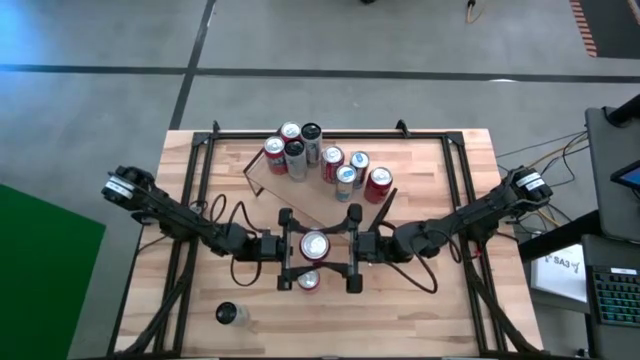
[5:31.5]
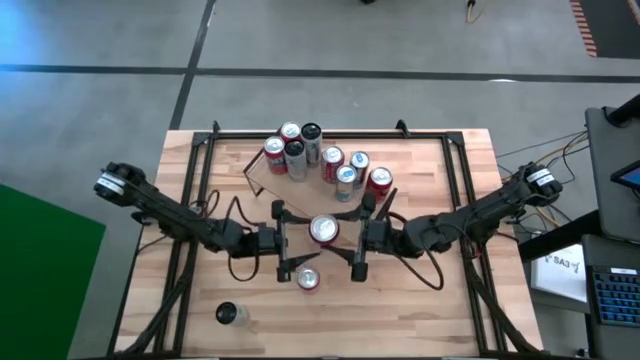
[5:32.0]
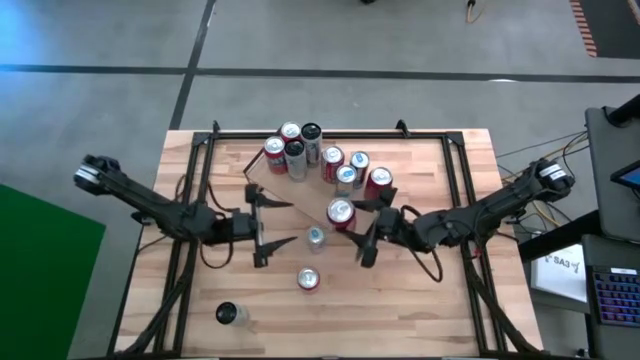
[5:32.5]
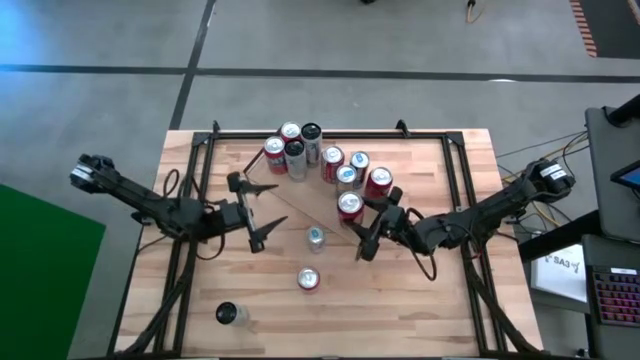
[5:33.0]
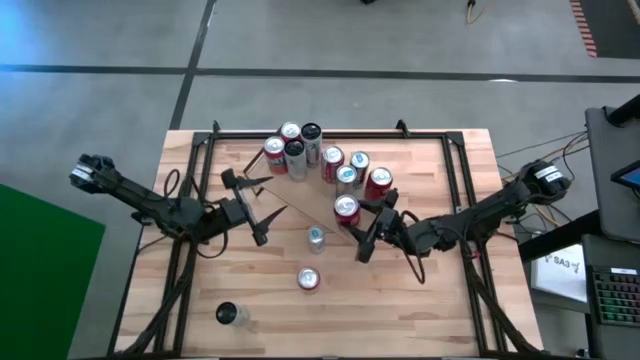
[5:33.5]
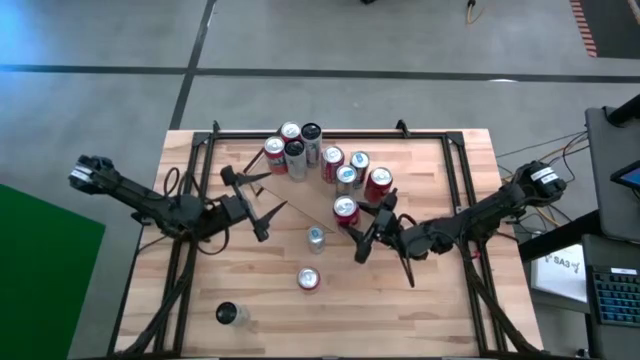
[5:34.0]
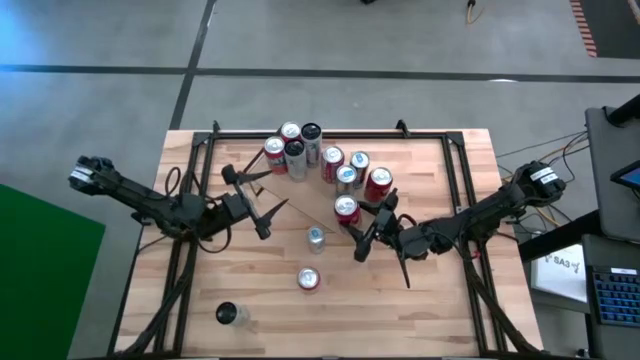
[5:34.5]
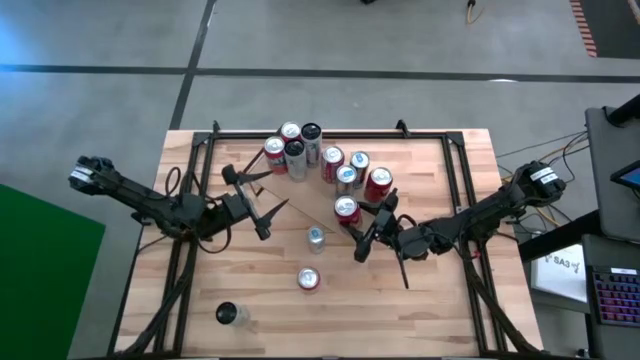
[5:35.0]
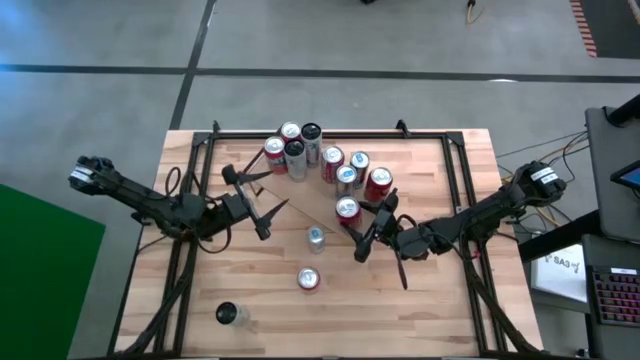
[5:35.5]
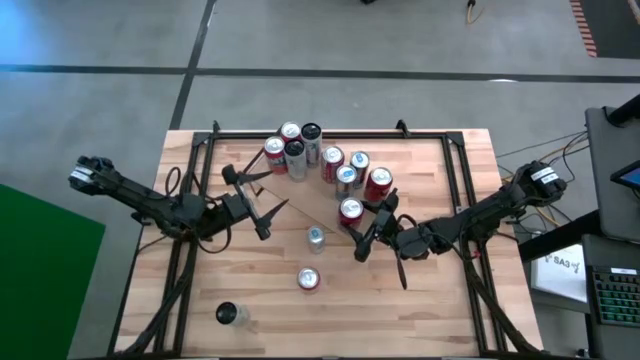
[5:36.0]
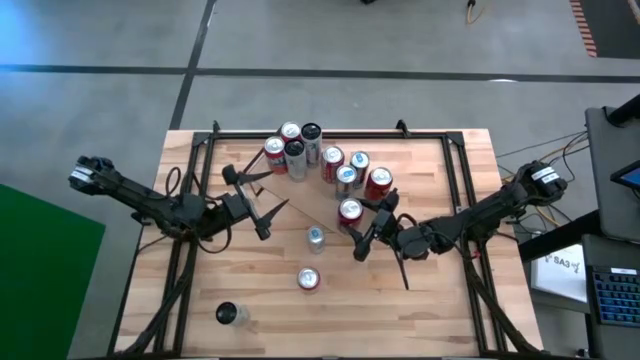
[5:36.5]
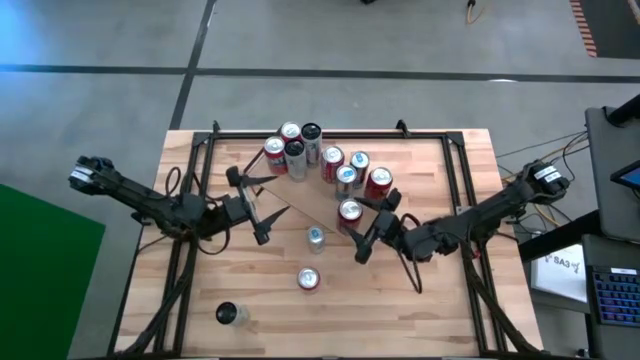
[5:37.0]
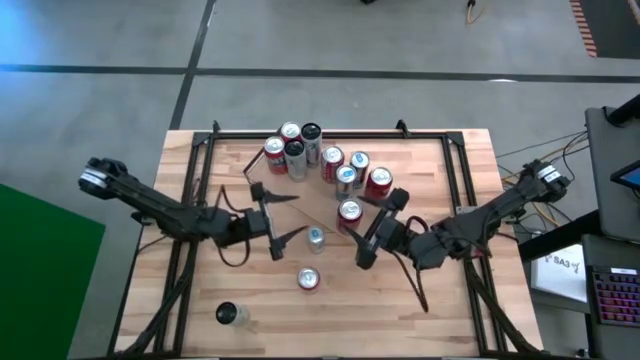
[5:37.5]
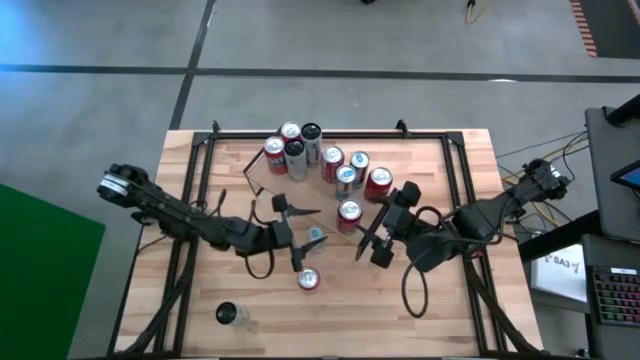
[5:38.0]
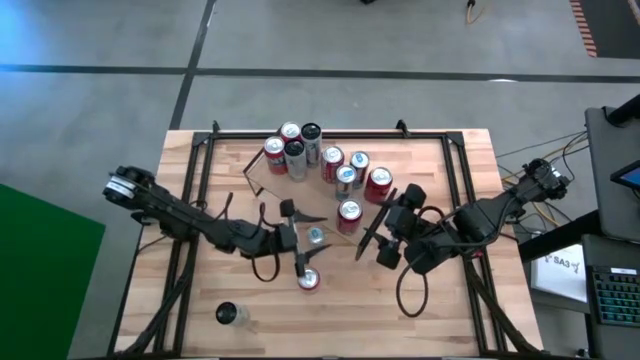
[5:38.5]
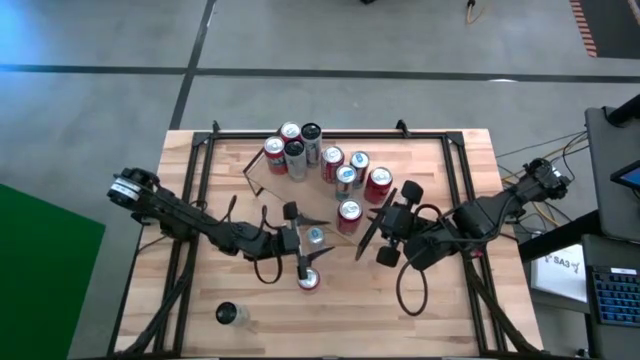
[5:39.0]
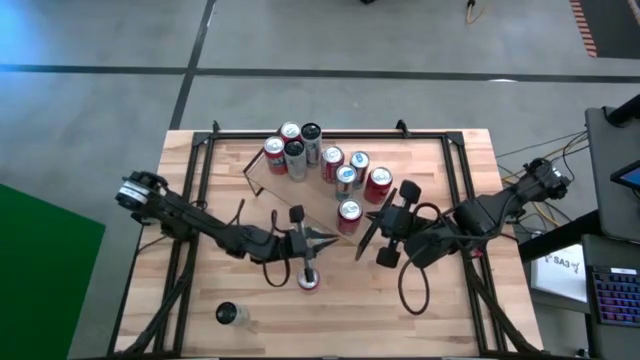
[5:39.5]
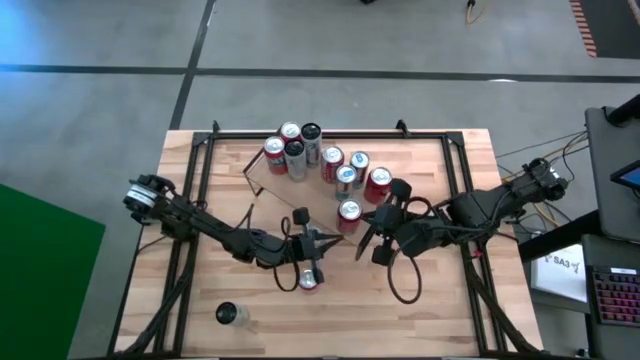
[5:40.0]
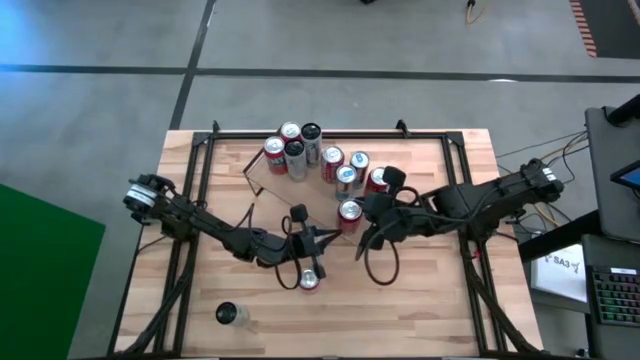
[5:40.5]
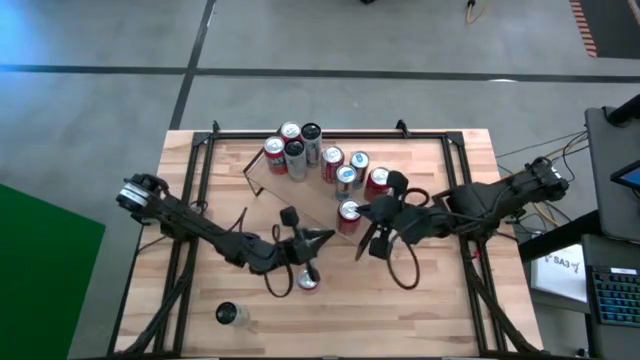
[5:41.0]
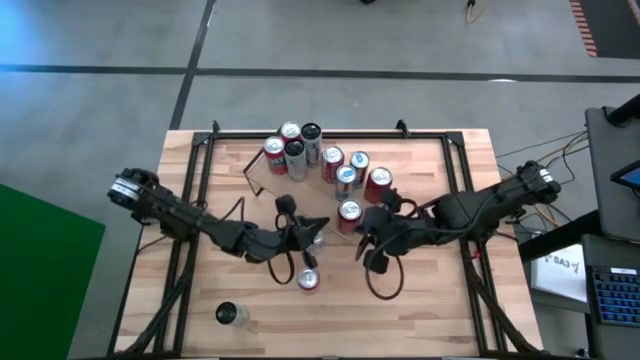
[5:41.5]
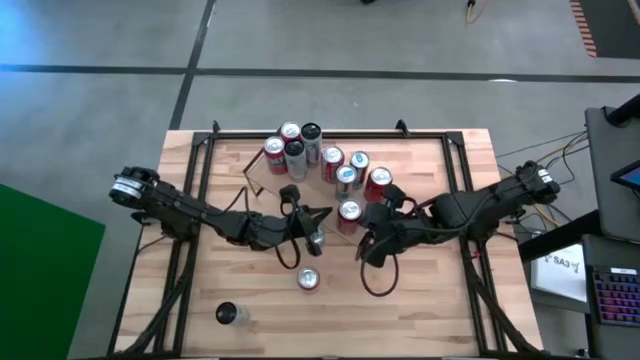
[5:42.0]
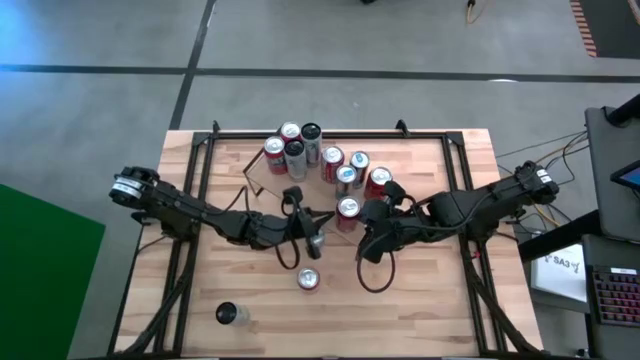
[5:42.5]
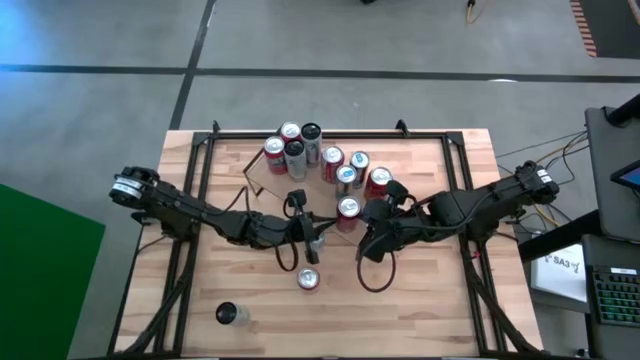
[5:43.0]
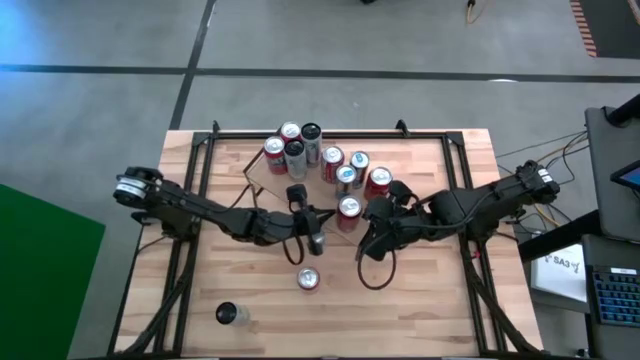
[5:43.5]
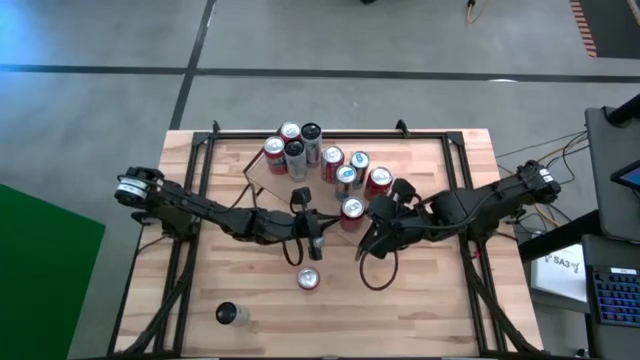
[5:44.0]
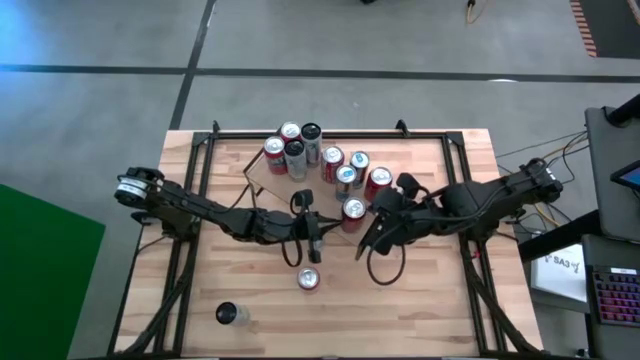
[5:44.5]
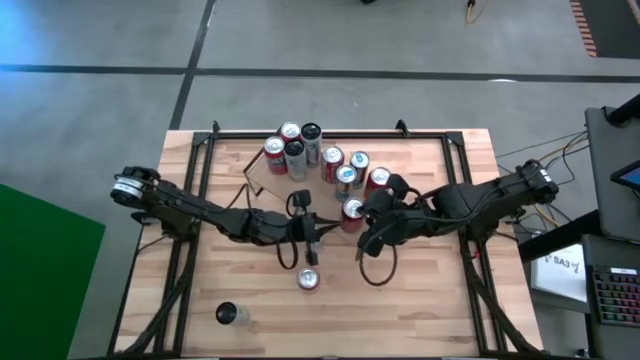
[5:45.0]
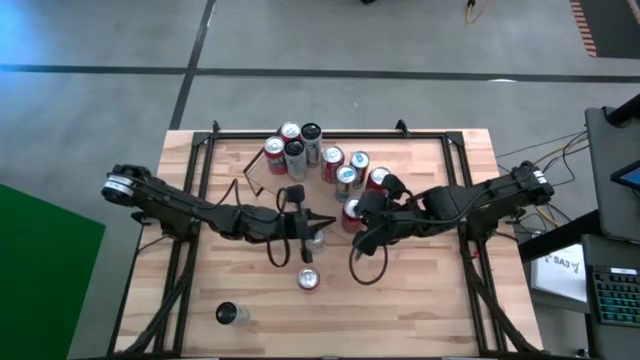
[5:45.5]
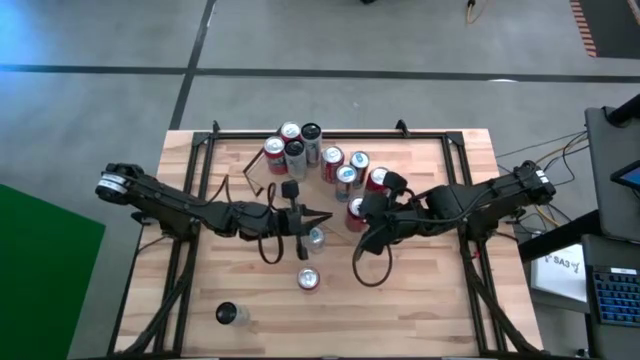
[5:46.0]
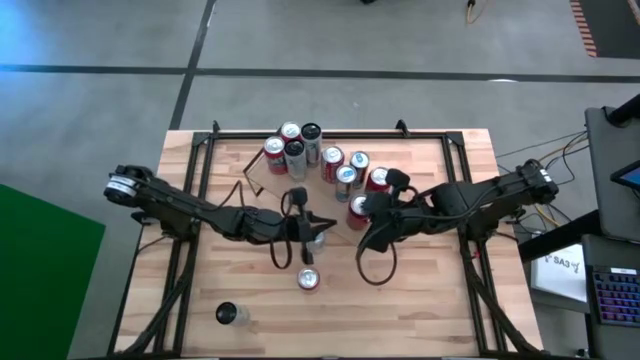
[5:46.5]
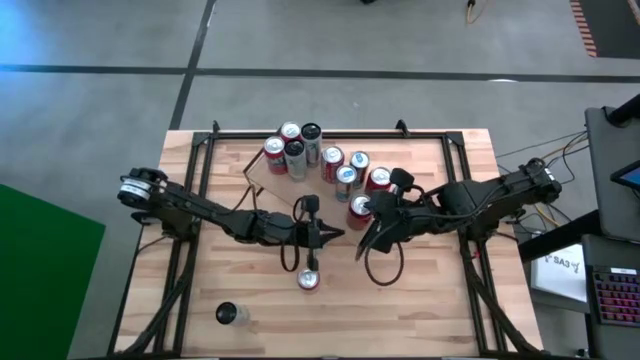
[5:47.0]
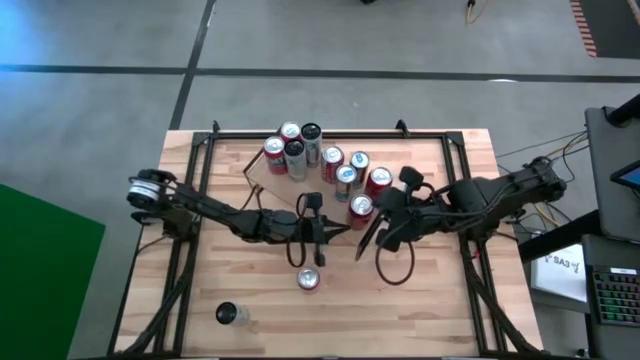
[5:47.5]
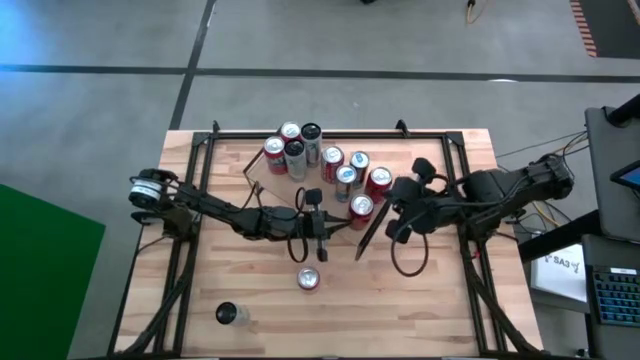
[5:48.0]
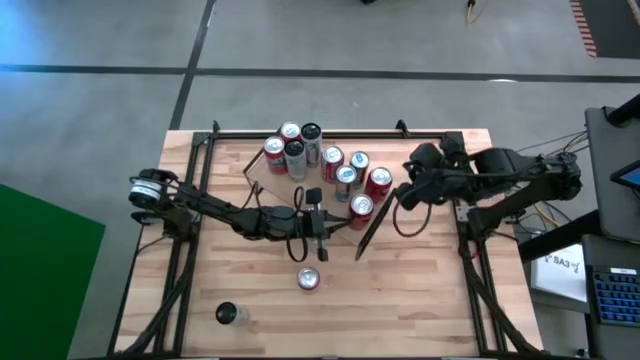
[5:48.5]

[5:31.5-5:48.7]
Task: Place canned beverage on shelf
Put the red/black soda can on the shelf, align with the other red/black soda can

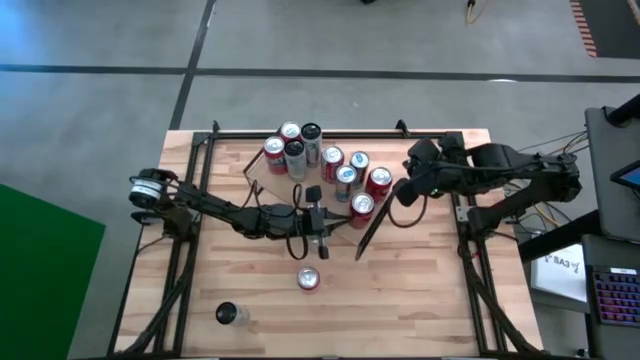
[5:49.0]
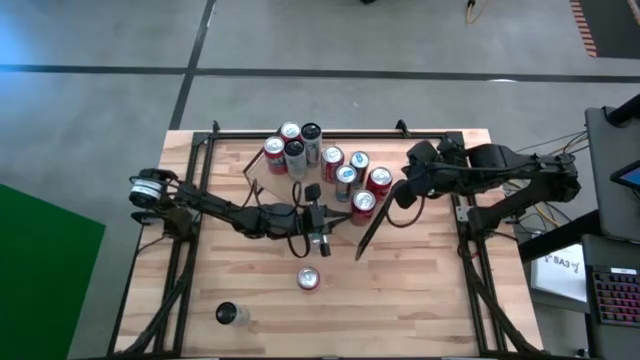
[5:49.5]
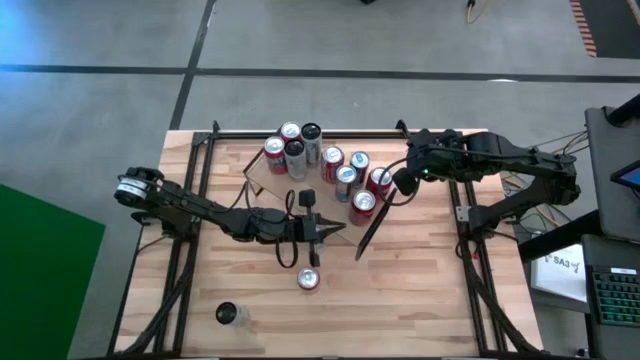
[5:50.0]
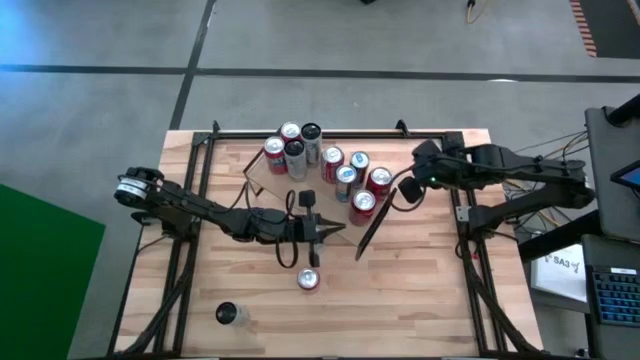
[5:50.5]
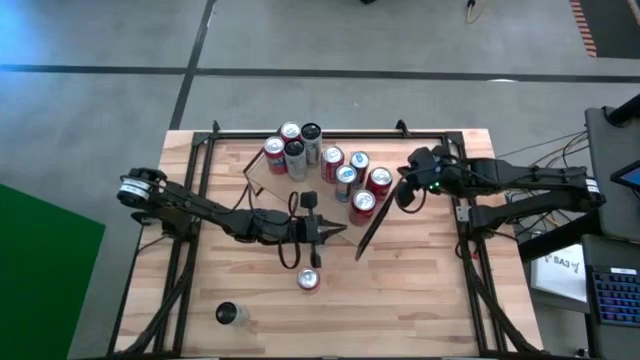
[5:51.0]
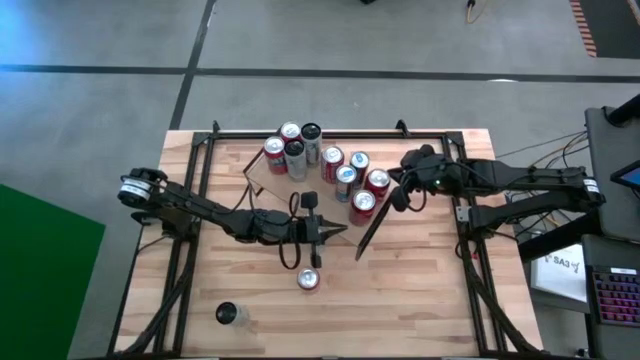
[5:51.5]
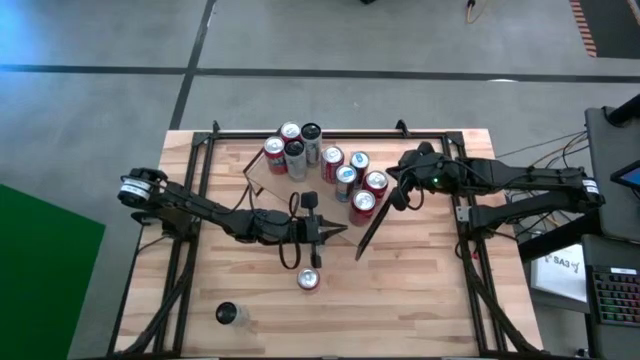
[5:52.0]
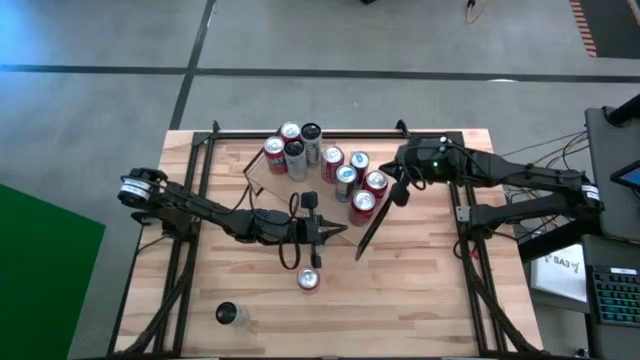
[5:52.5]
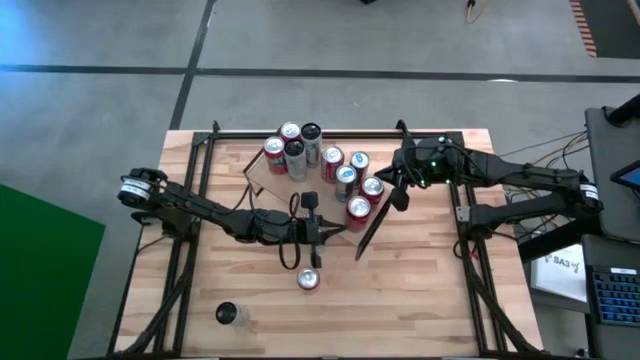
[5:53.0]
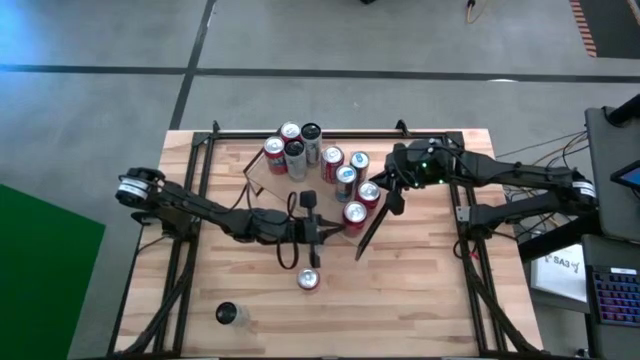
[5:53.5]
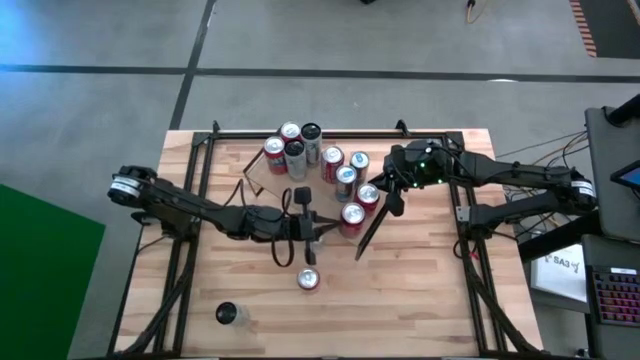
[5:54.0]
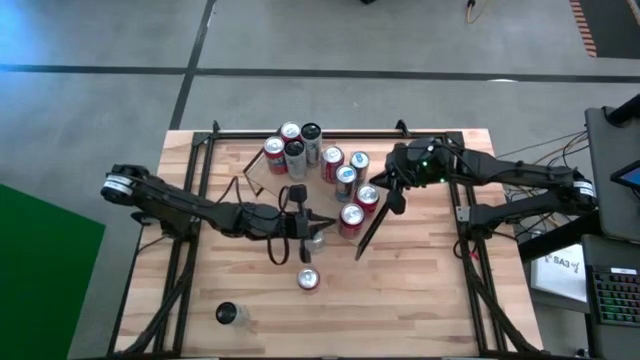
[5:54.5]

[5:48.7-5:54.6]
Adjust the red/black soda can on the shelf
